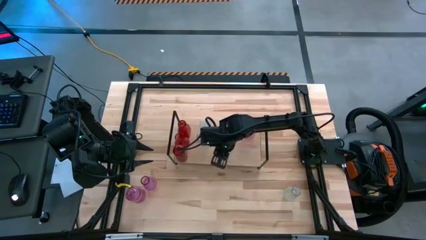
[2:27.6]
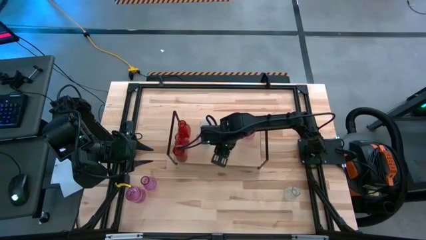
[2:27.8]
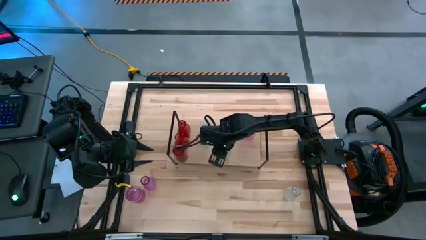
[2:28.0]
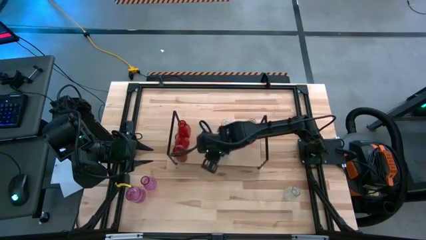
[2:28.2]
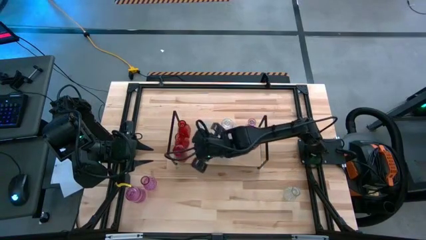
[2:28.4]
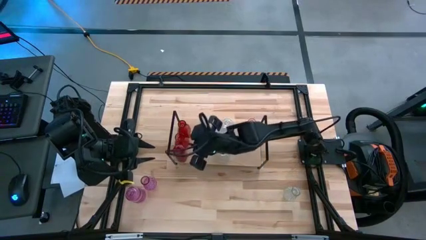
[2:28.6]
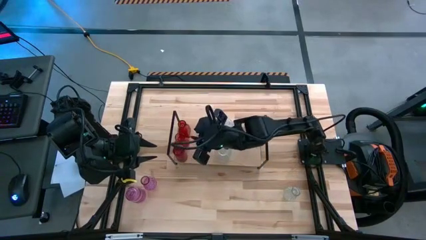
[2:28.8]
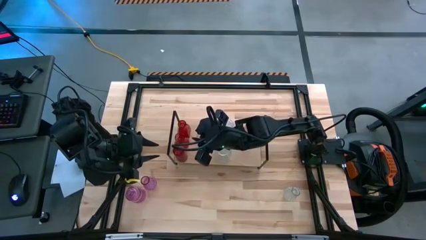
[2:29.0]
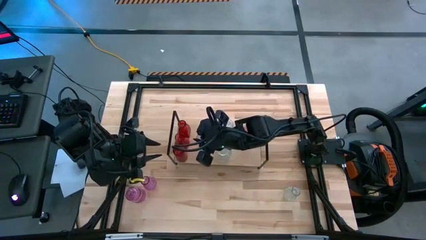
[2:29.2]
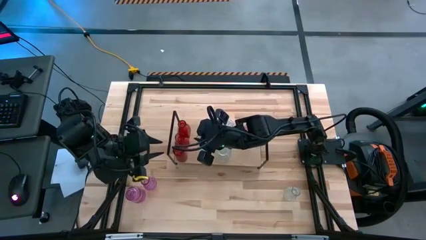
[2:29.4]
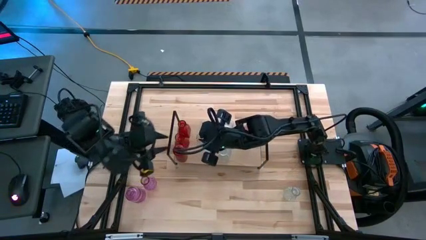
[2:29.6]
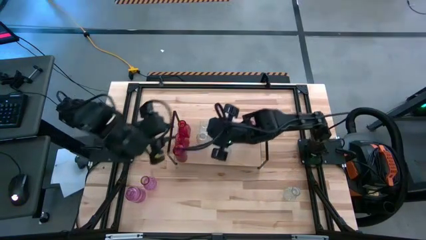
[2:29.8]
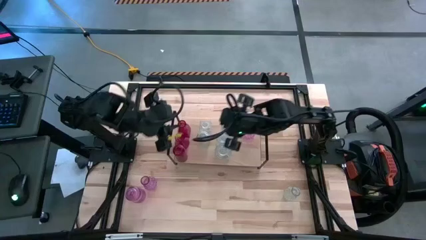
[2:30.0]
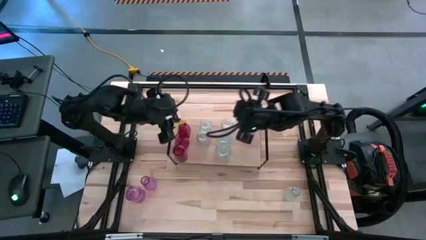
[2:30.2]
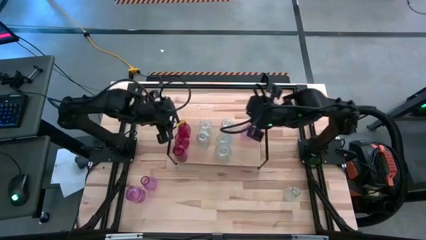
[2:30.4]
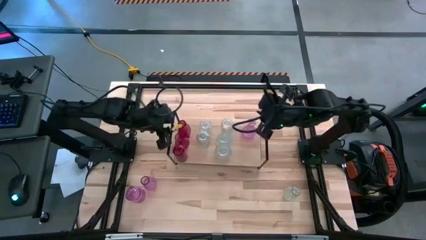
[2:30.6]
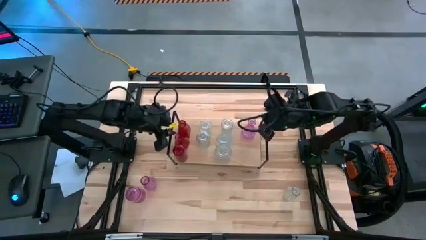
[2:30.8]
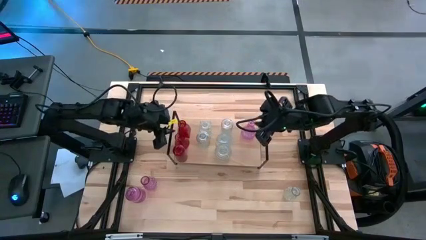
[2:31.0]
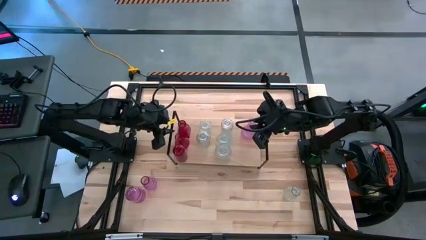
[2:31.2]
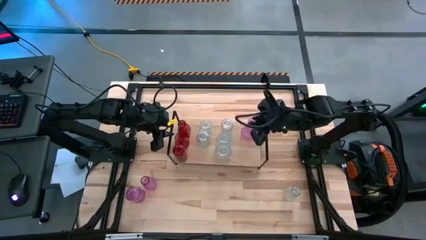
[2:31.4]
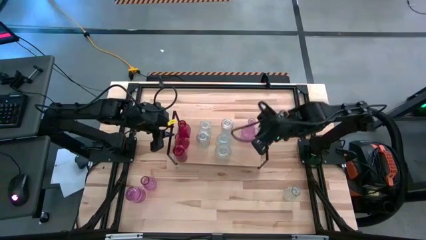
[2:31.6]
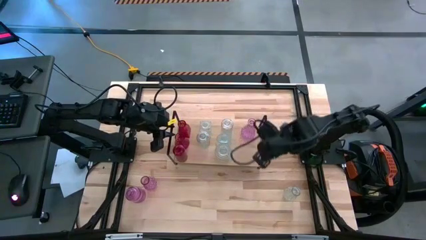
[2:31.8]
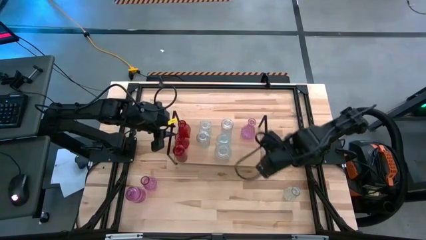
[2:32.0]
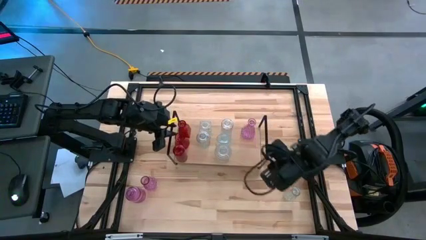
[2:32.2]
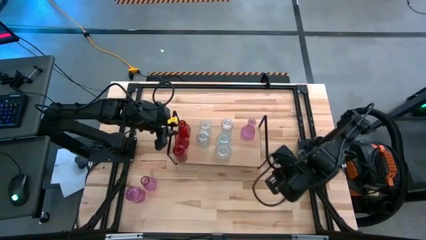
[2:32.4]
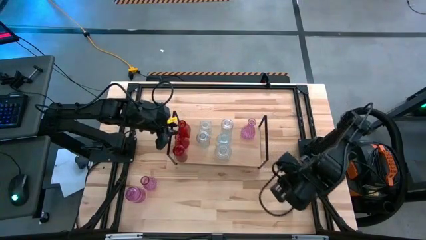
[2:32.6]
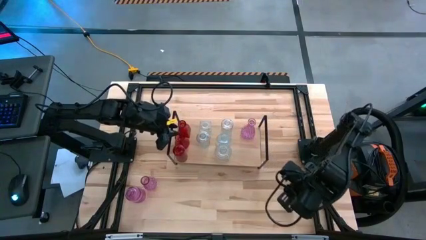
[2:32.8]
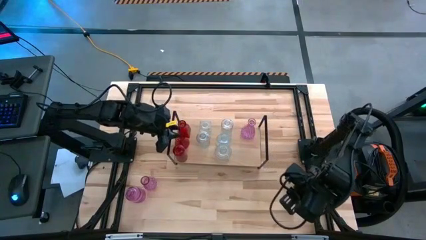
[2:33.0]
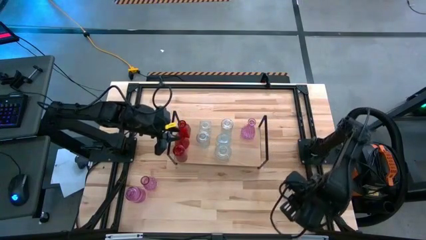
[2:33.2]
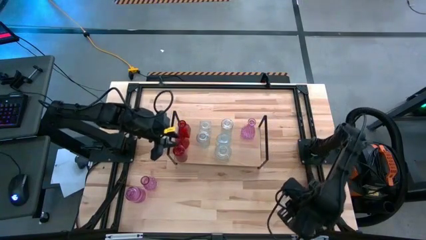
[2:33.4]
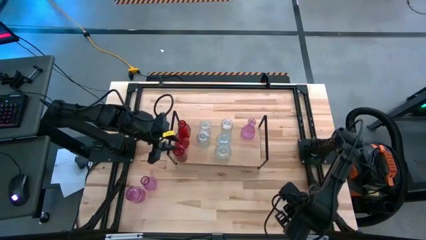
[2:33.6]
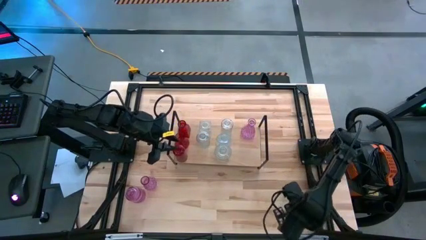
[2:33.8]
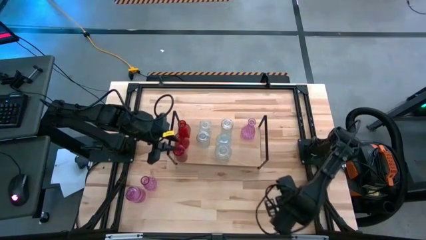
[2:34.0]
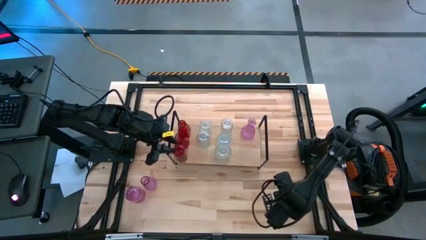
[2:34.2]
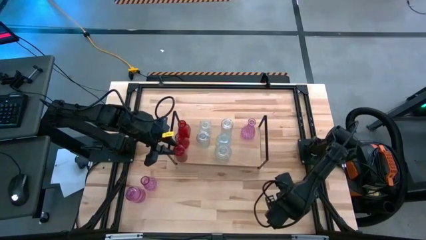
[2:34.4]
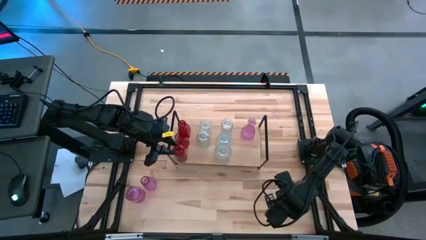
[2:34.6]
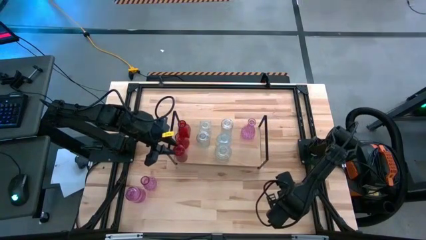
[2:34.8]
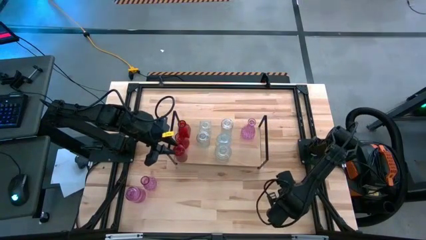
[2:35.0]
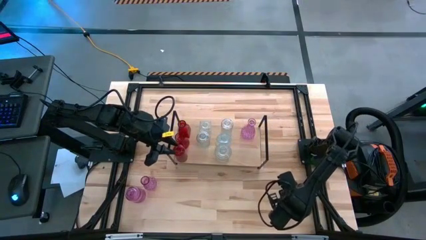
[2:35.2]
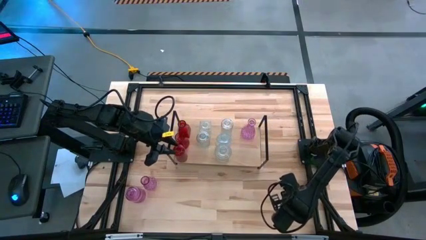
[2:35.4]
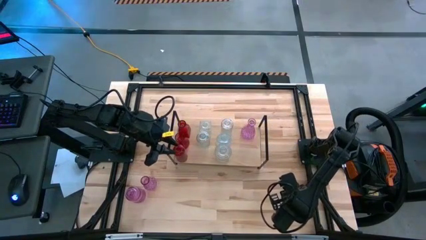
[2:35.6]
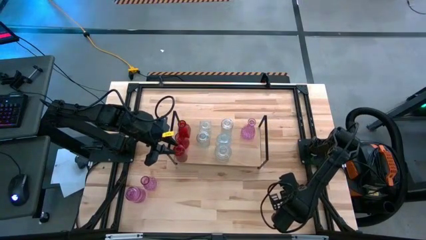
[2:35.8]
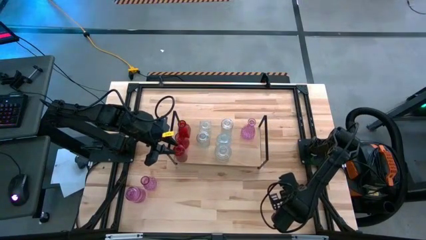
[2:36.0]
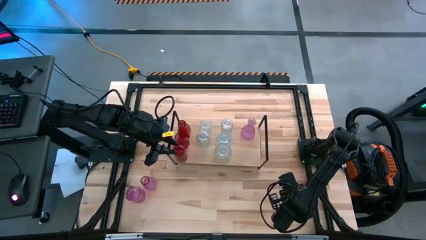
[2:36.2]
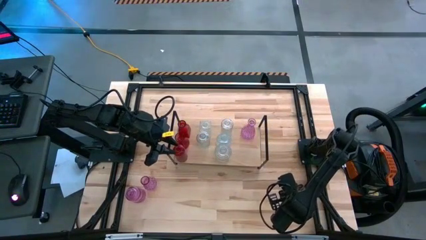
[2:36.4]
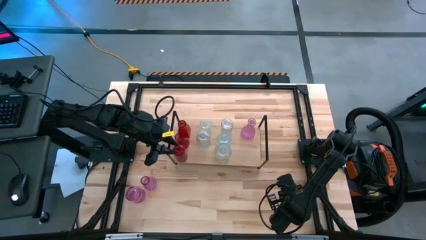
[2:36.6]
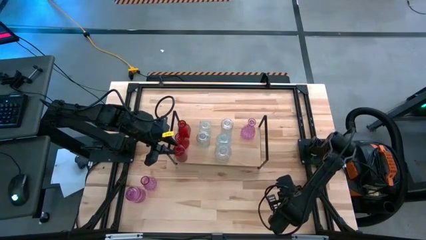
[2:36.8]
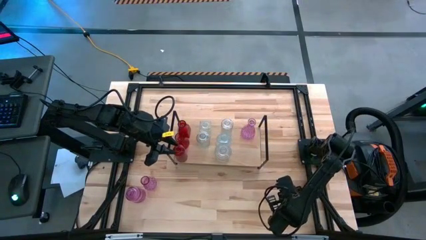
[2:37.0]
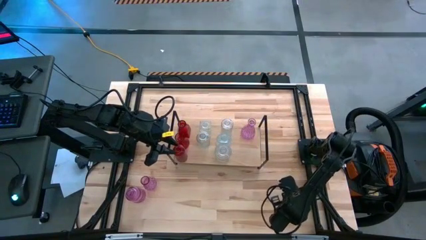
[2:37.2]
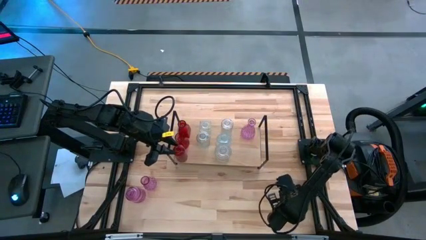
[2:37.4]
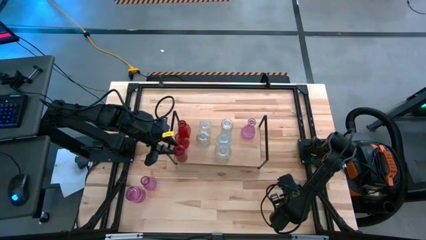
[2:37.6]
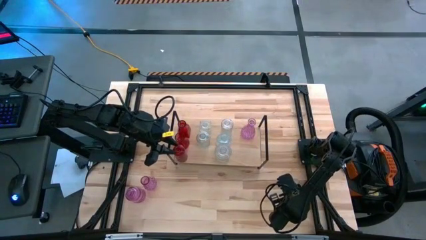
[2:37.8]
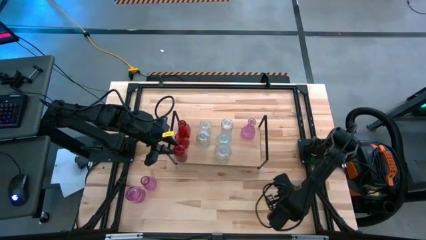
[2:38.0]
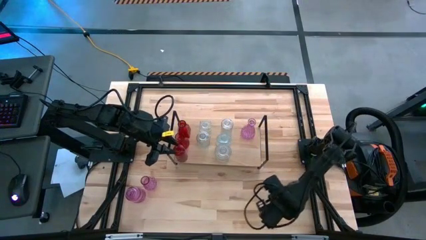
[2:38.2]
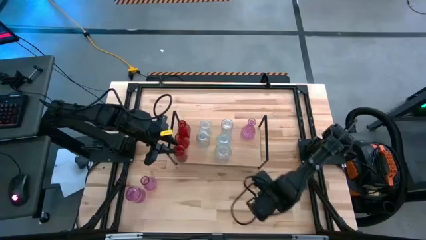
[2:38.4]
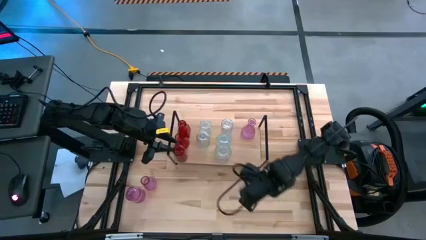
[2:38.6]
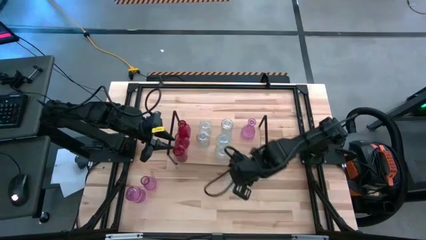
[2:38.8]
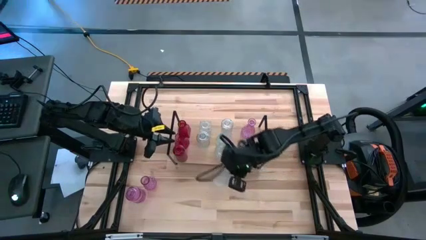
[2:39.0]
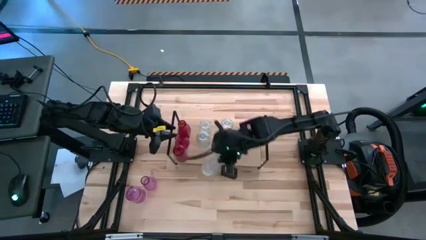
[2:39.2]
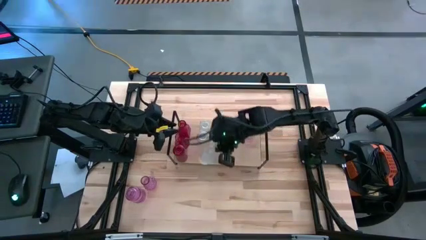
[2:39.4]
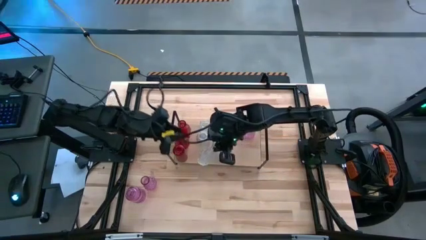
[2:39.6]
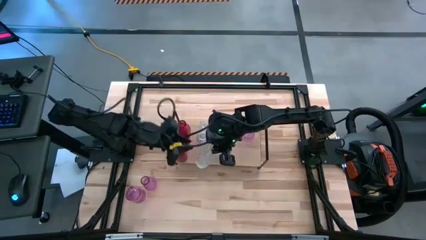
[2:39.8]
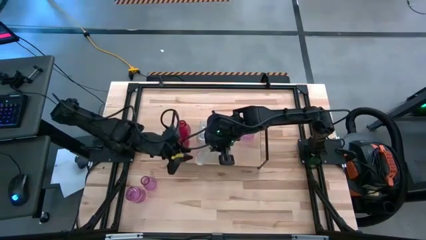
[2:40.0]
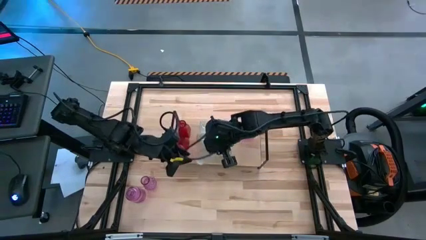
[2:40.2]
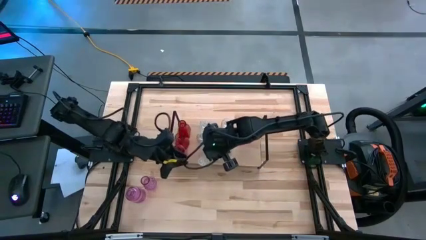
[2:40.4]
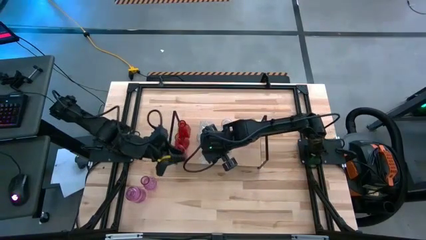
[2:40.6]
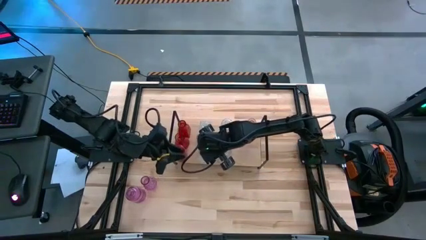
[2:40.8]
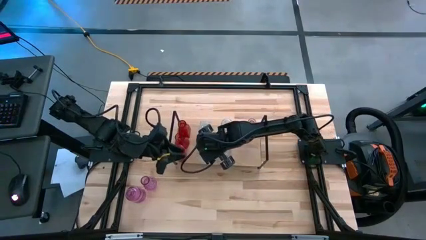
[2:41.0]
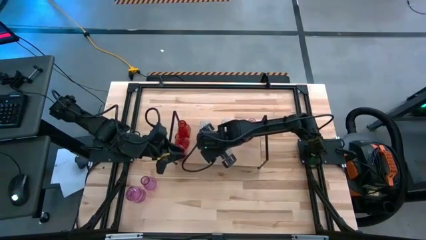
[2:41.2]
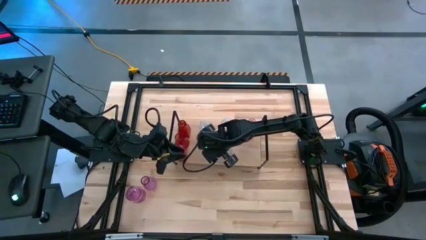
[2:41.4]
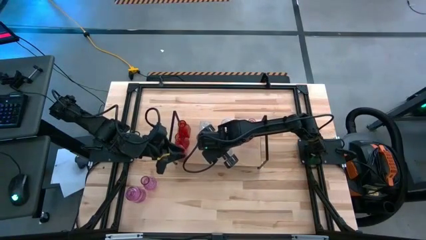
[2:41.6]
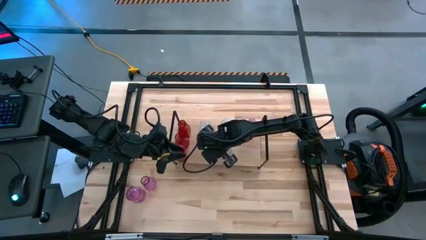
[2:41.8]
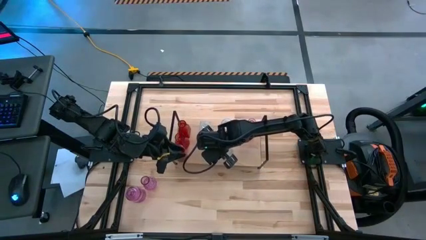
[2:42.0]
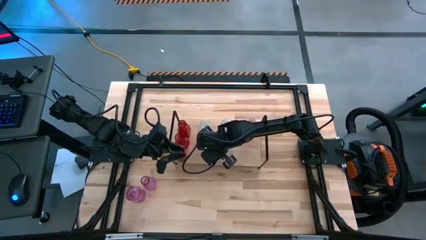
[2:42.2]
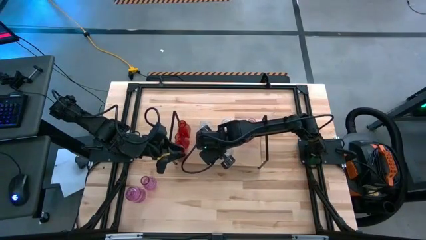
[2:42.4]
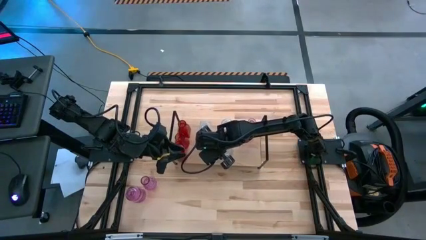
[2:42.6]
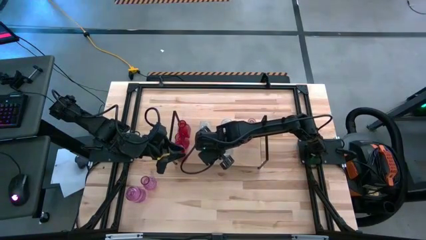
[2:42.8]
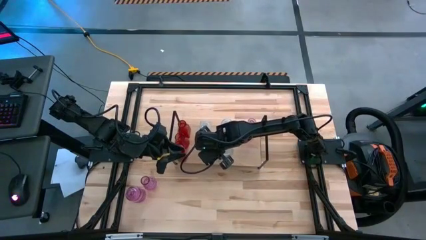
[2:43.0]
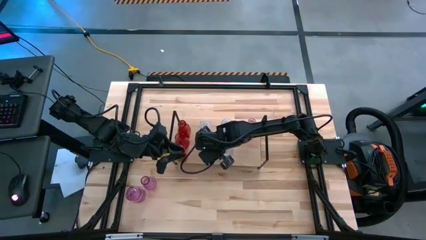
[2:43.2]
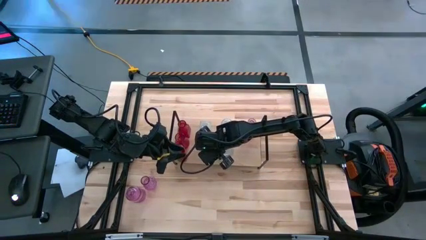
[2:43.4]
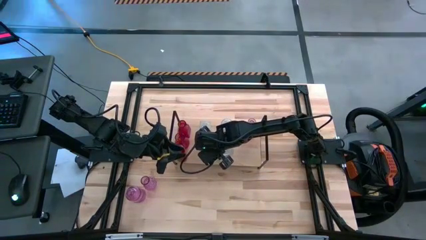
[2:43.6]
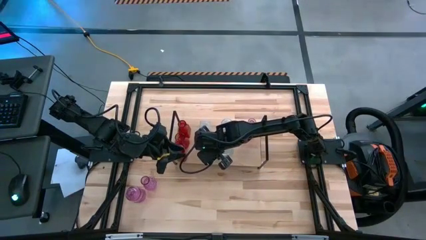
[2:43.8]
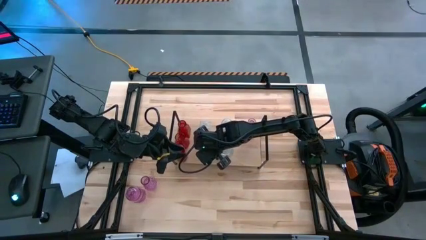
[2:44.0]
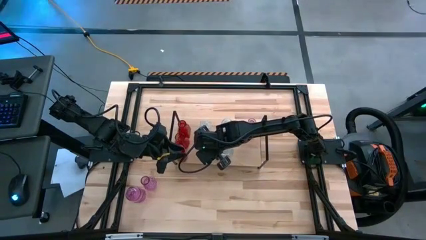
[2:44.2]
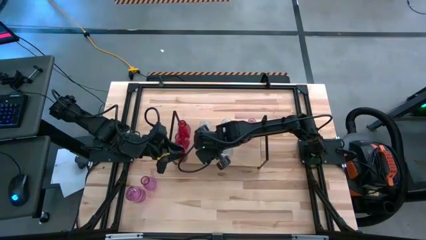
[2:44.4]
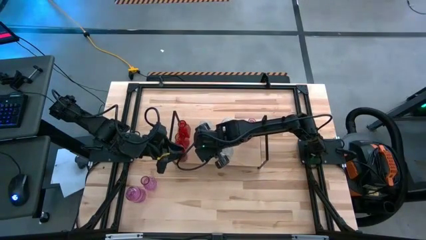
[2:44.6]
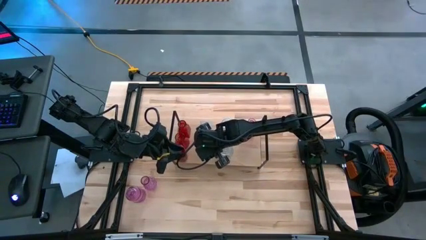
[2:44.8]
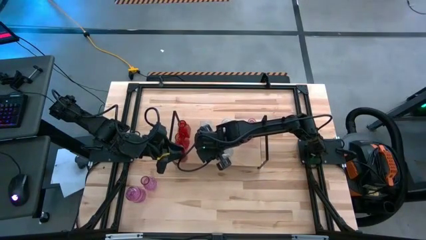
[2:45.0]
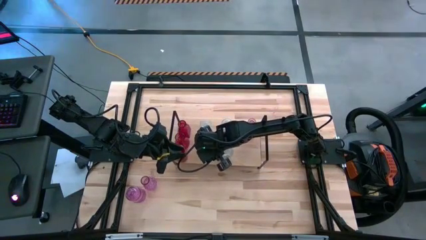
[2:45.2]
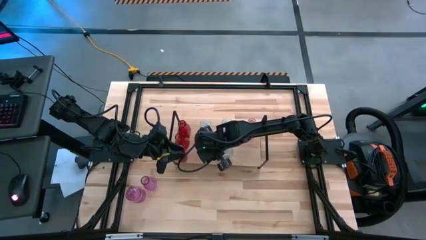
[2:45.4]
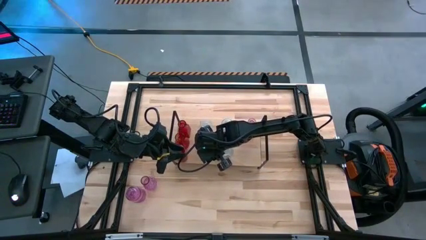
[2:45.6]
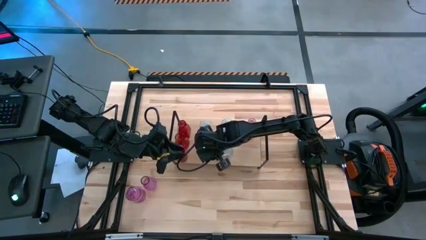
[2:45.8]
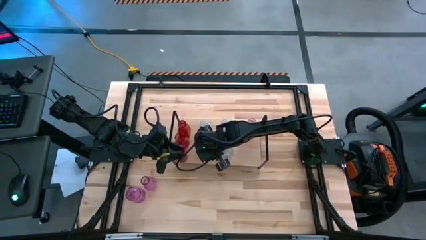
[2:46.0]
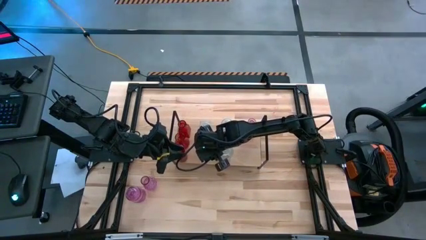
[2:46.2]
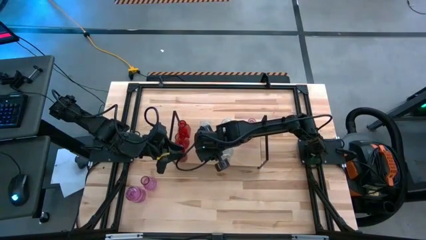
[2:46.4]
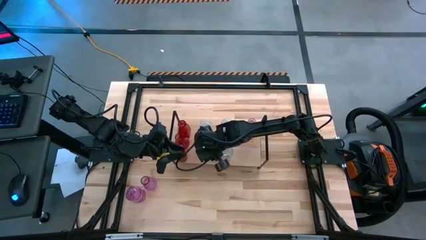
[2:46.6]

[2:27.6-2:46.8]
Task: sort vases onto shelf
Put the transparent vase aligned with the other transparent vase on the shelf
